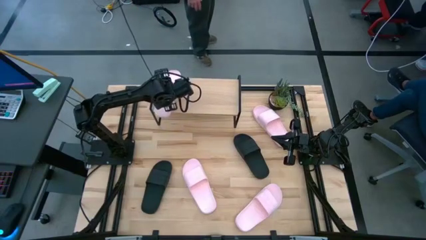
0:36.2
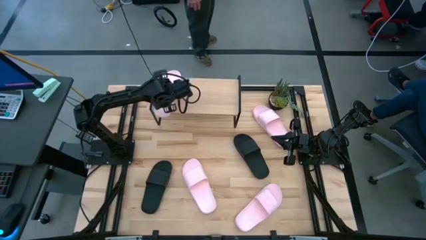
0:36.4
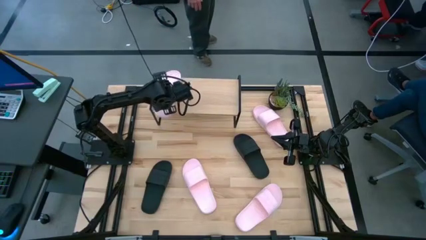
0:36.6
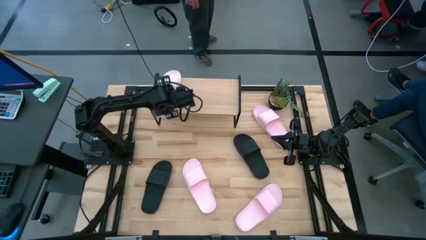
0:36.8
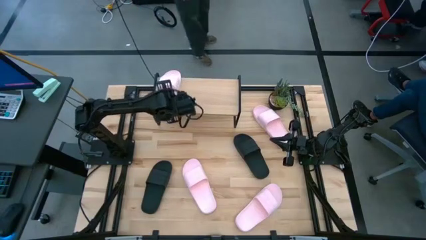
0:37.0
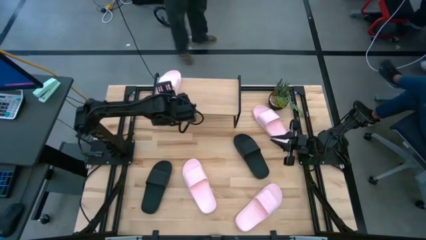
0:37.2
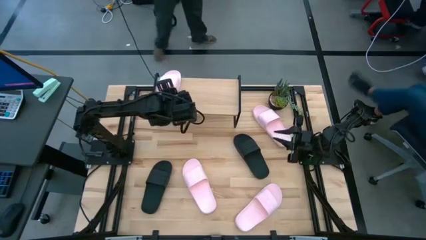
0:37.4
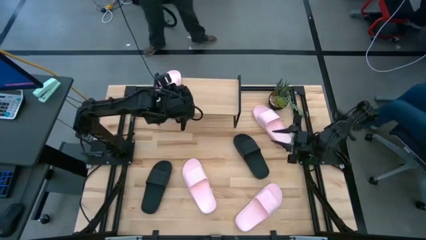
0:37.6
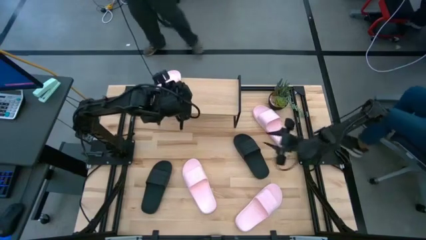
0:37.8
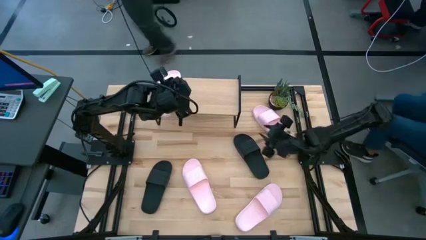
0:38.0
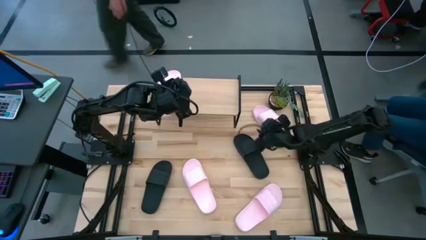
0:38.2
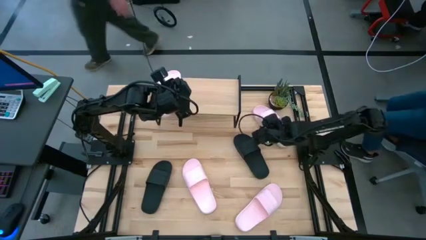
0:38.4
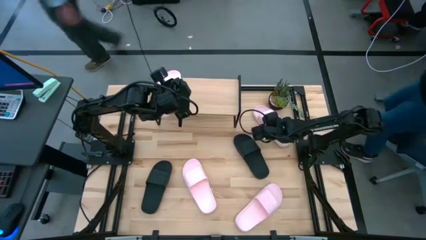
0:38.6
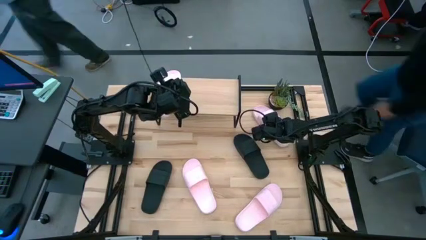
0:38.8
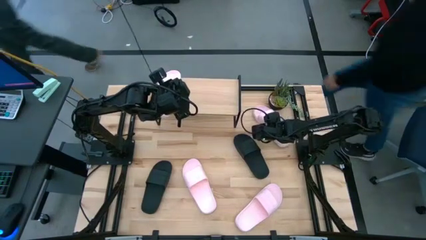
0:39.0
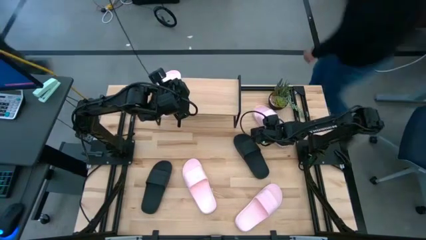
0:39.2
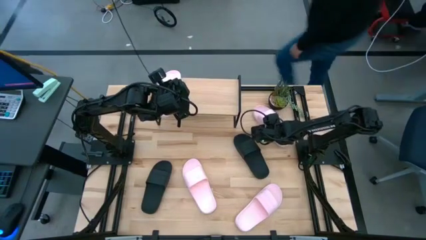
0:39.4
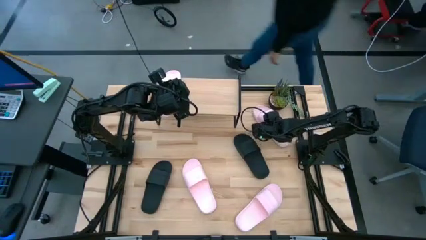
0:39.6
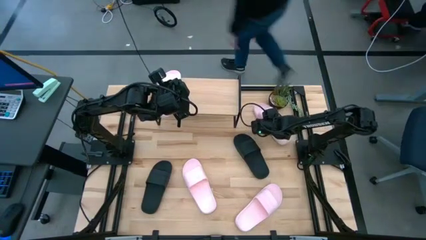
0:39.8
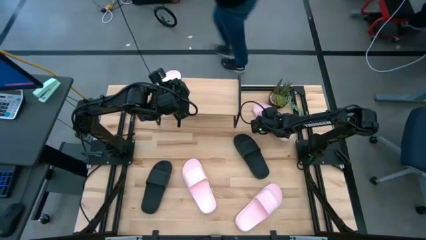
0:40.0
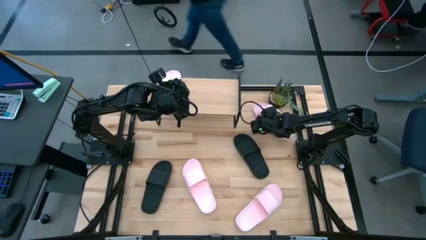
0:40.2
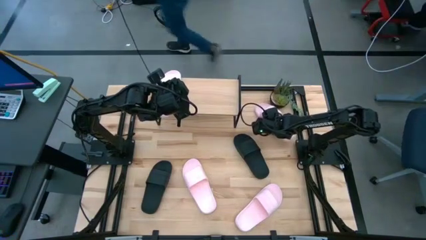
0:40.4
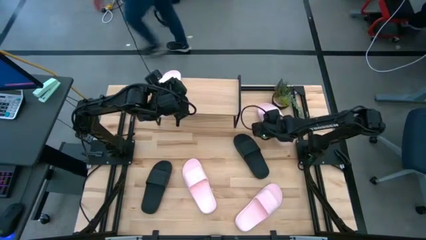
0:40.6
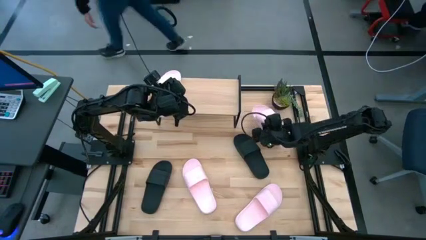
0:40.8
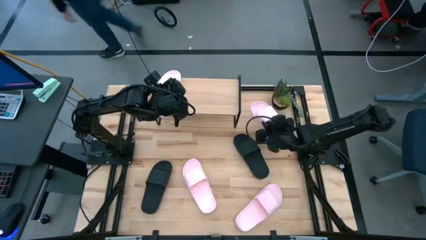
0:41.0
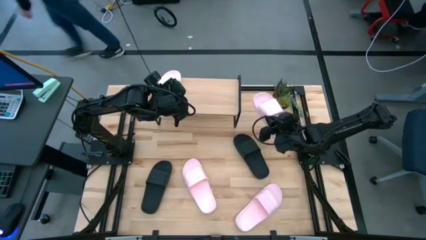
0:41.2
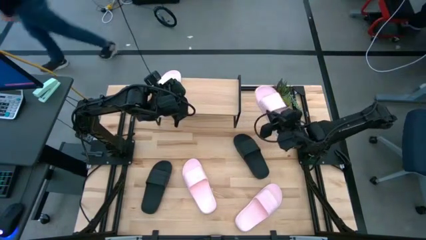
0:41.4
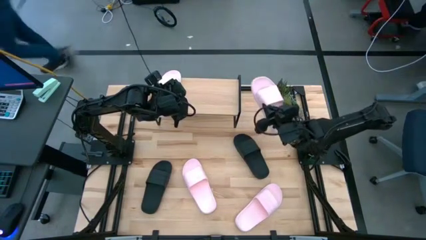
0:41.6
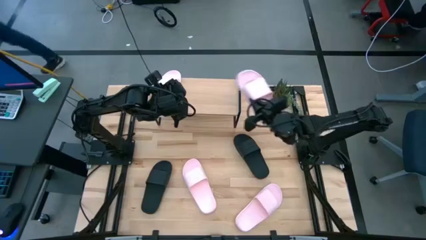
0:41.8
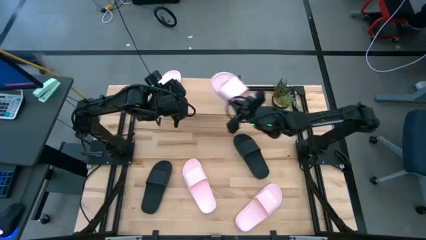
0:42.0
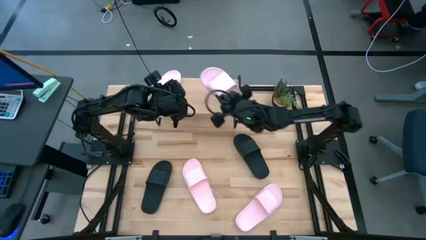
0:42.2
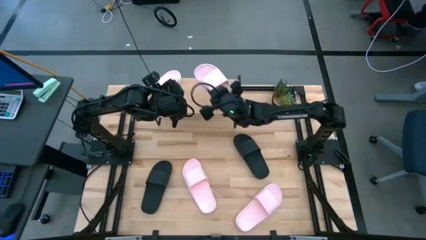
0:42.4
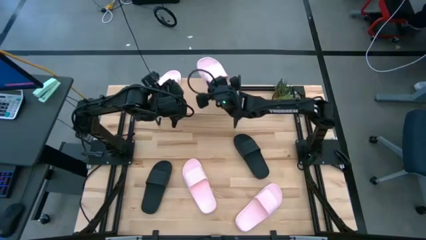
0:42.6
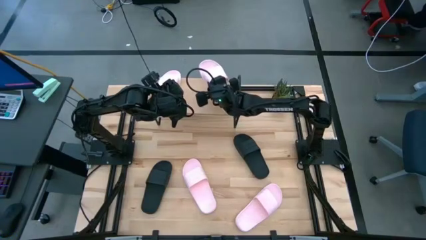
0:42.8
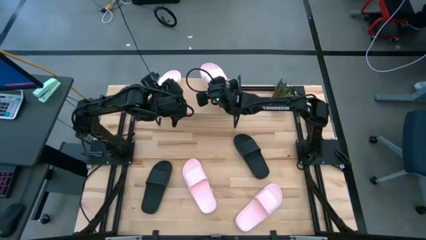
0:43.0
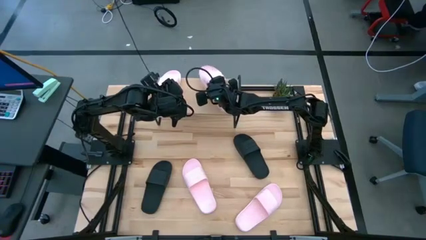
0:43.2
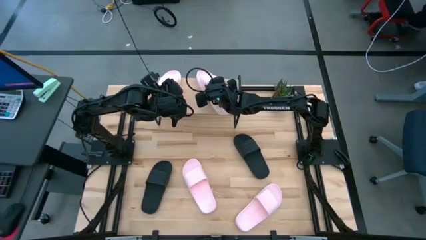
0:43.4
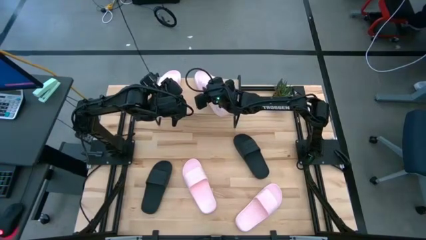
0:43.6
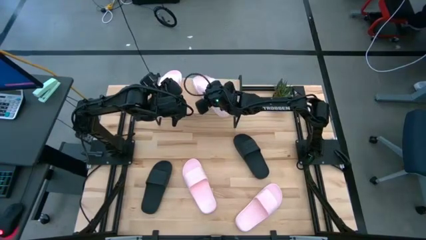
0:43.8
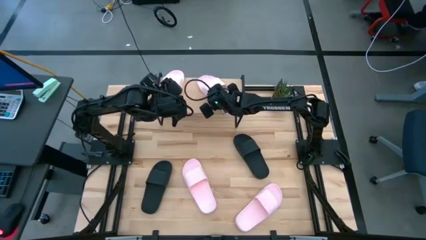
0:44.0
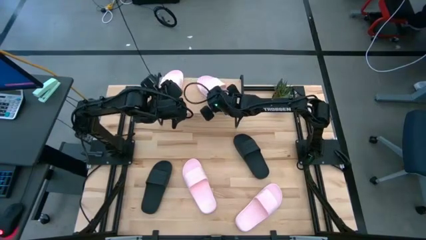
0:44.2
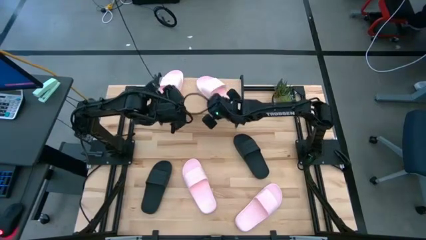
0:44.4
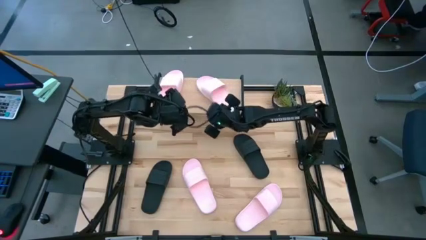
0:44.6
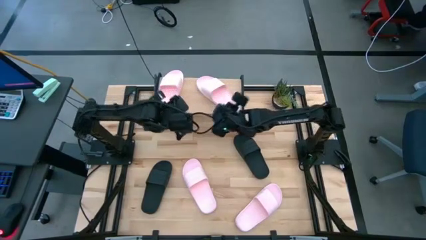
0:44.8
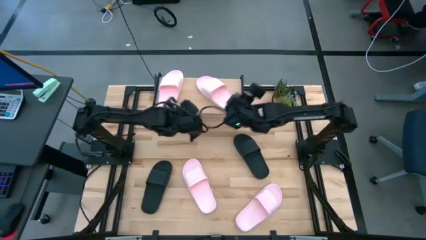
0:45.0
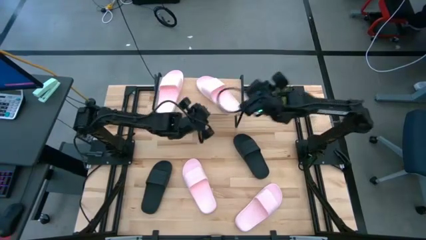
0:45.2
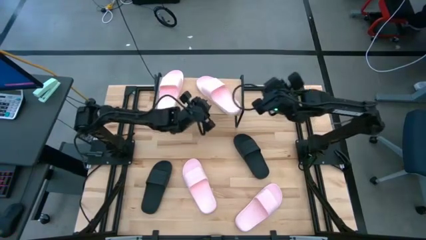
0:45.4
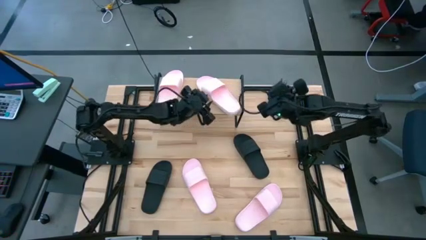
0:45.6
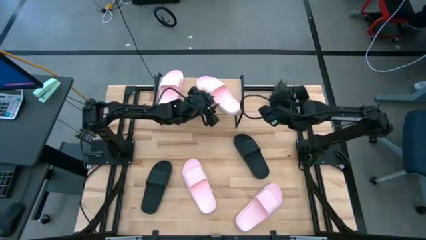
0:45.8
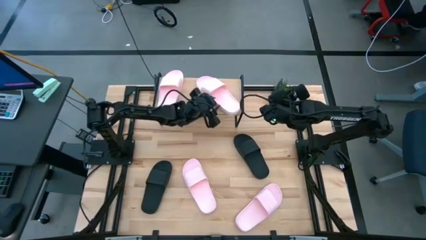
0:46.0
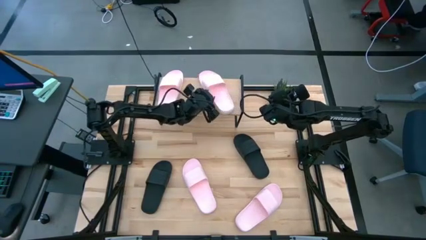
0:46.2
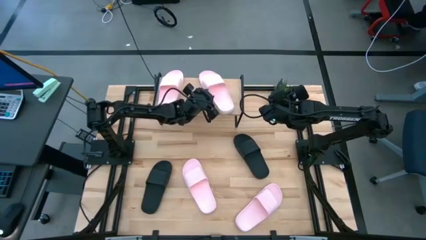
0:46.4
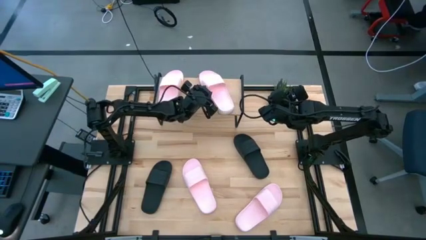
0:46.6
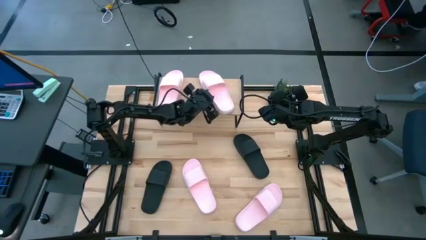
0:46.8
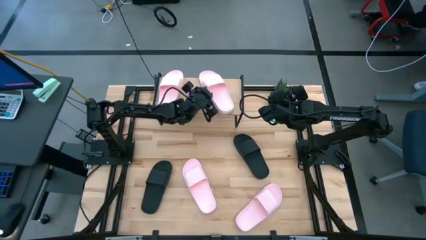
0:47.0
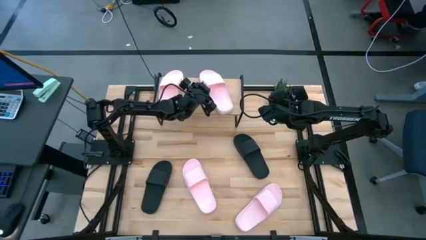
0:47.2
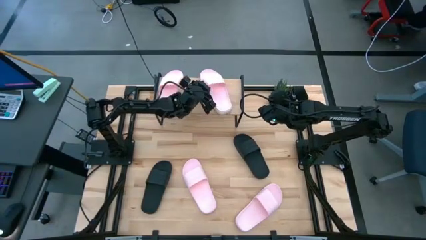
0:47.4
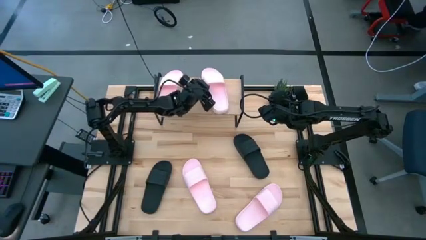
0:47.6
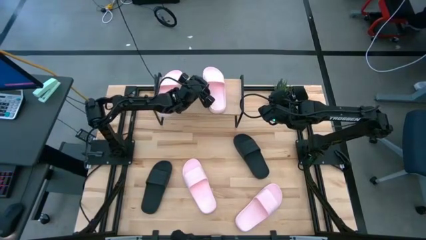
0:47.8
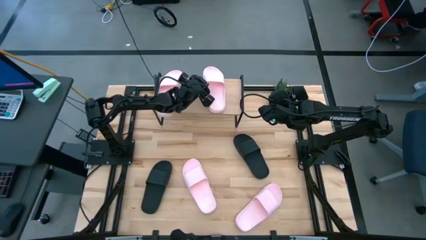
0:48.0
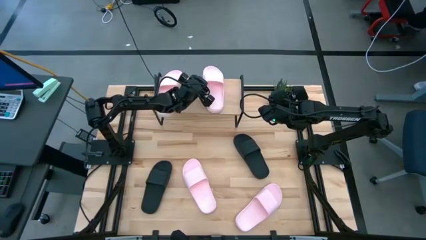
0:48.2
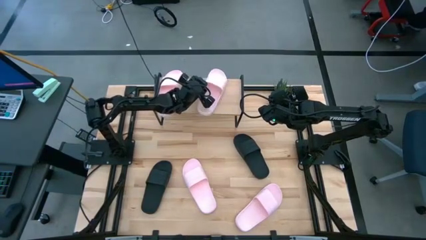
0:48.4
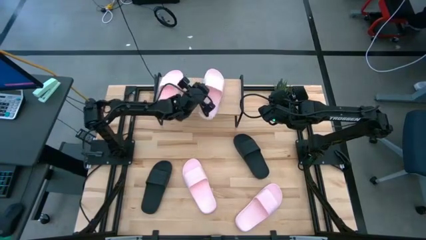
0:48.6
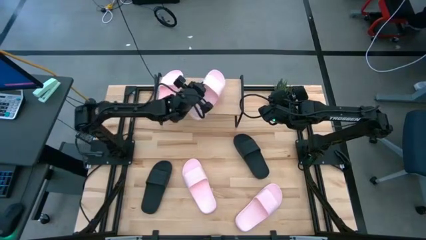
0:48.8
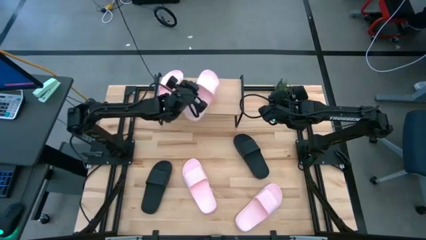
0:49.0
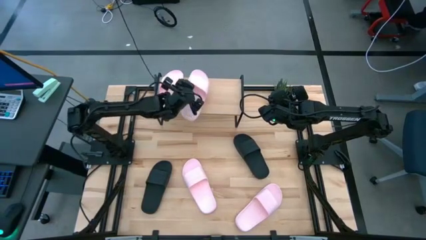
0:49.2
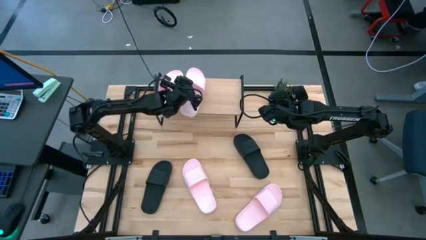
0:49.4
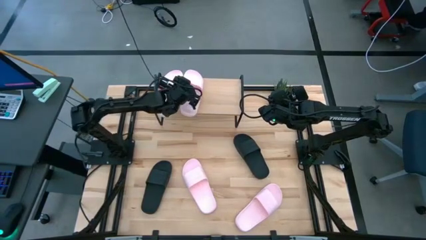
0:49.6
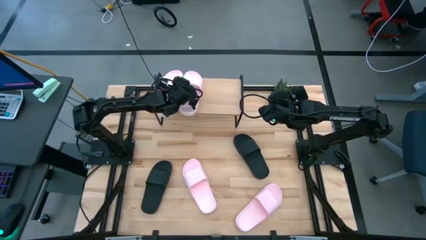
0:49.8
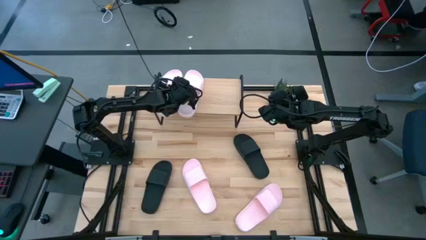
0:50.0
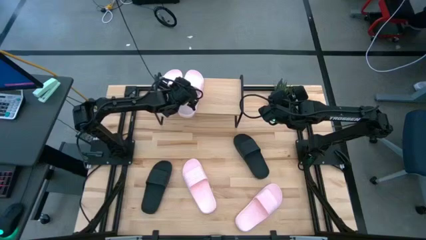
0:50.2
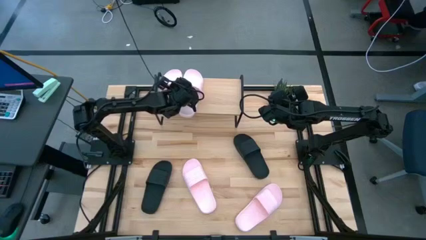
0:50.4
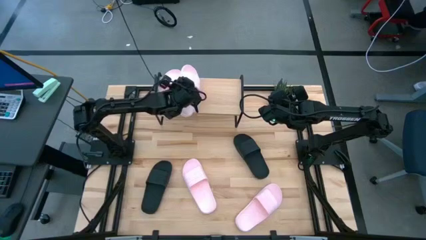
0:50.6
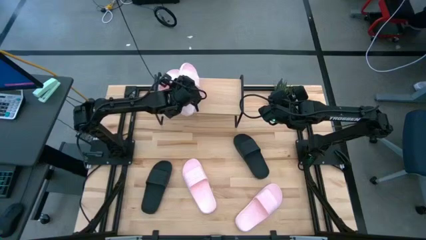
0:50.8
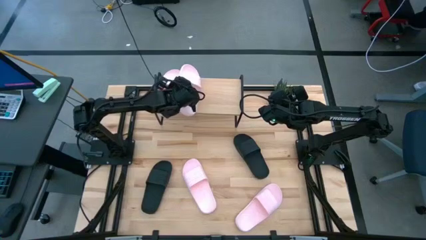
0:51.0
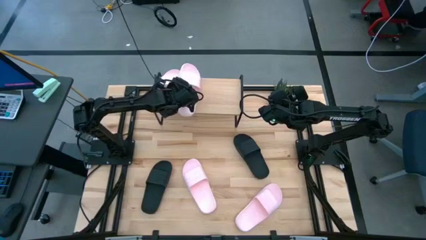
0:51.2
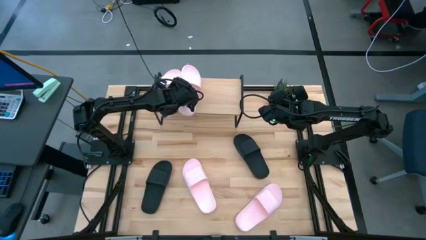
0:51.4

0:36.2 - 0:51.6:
Task: Pick and place slides into the shelf
Put the top right pink slide on the shelf

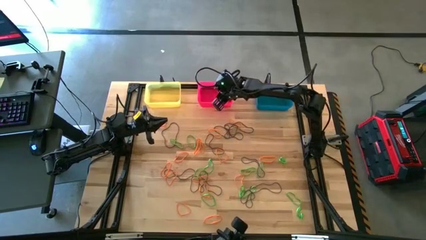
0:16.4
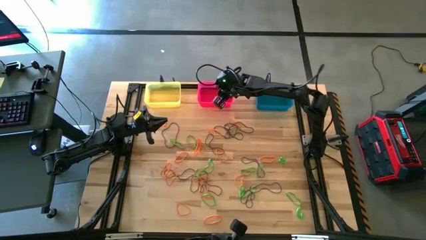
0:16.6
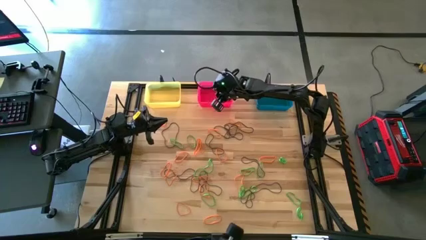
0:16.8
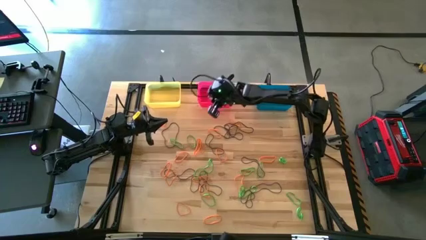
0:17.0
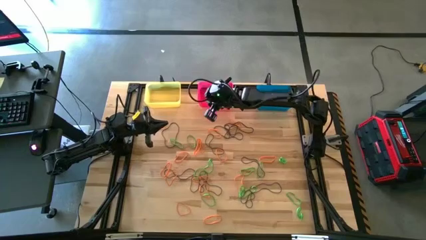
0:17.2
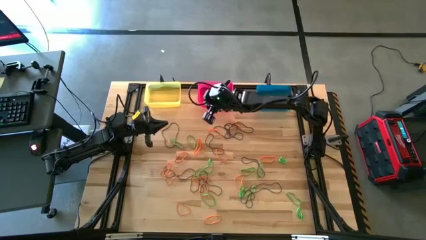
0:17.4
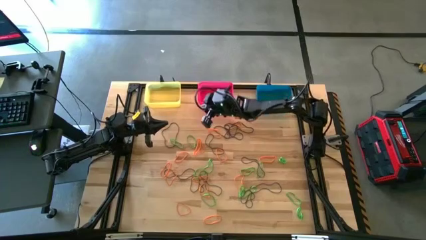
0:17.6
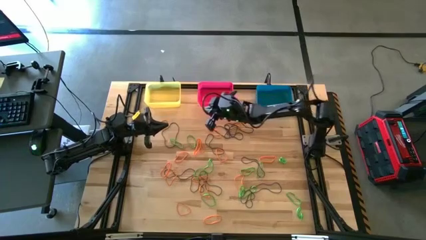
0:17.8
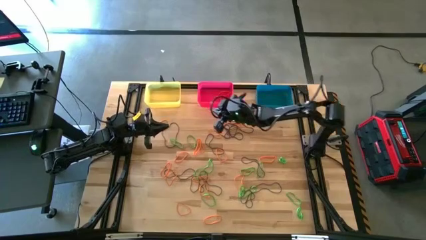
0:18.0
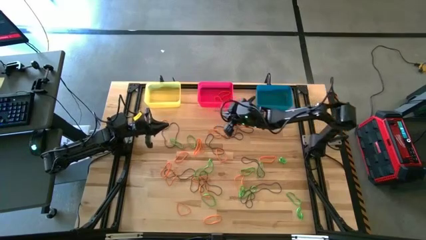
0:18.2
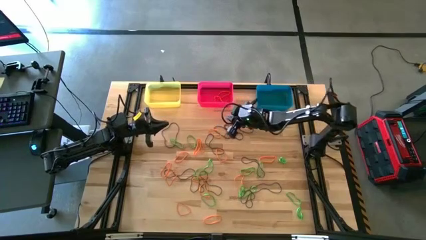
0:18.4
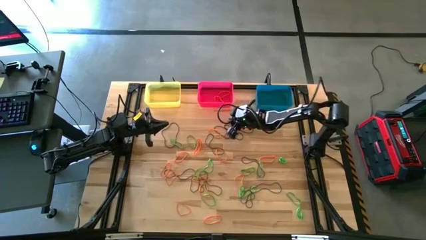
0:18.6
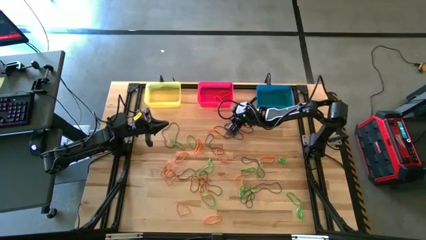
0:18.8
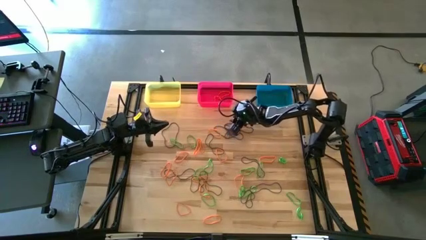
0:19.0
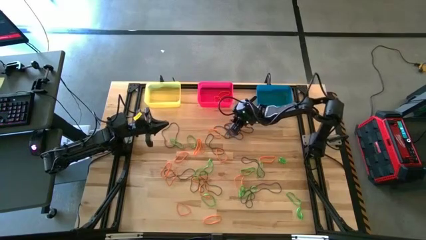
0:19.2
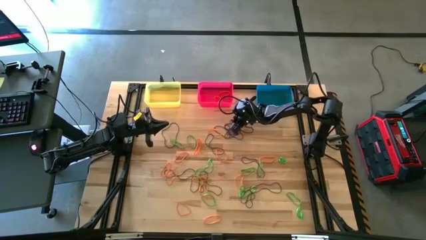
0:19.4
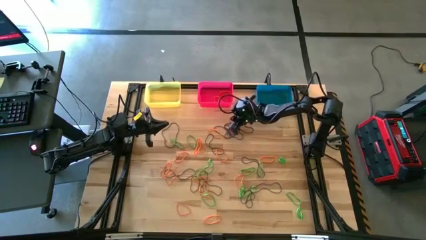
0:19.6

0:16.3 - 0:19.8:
Task: Sort rubber bands into baskets
Put the orange rubber band into the pink bin
